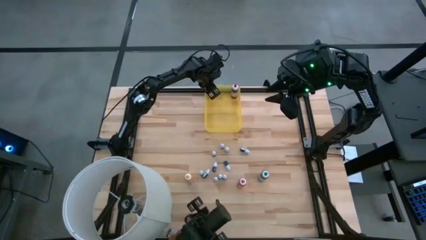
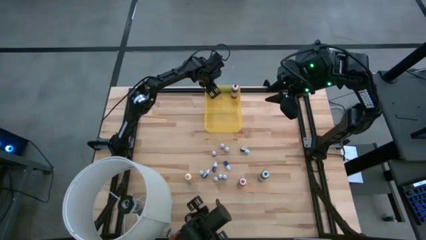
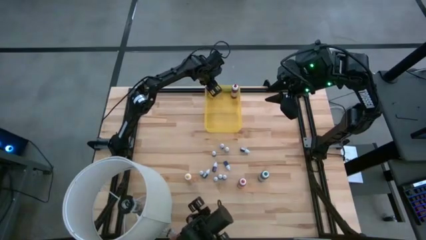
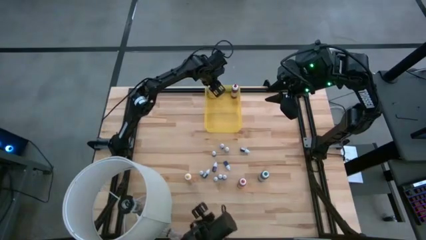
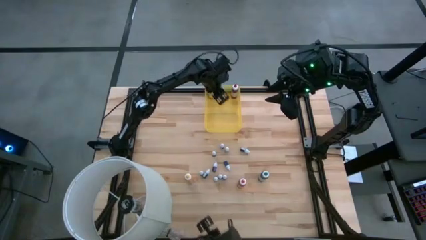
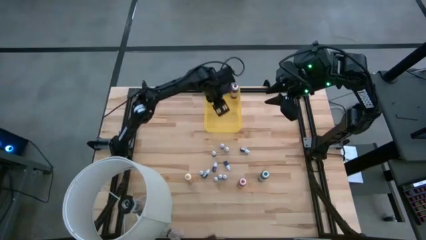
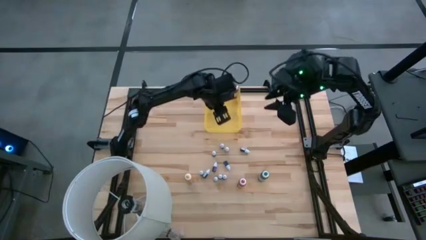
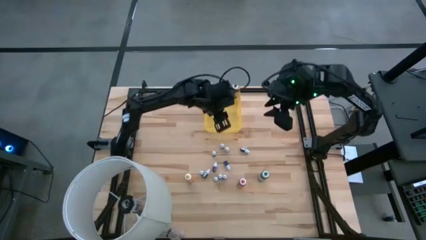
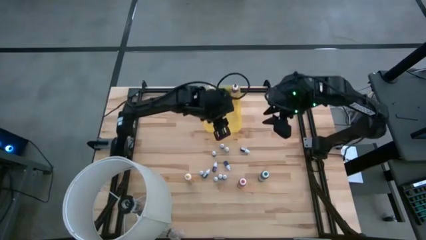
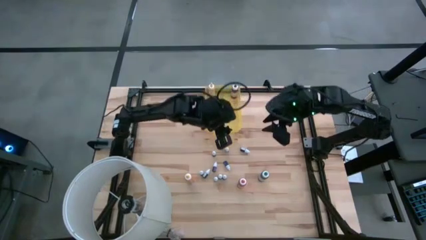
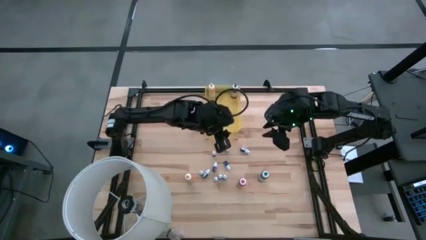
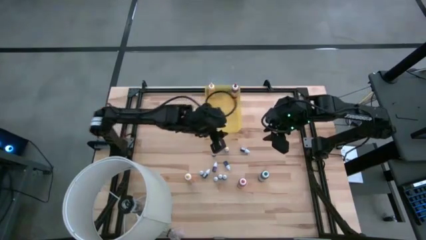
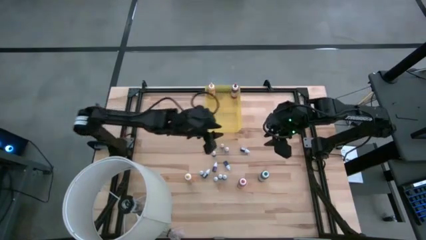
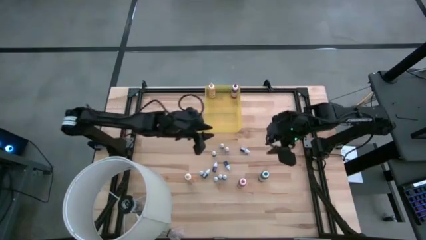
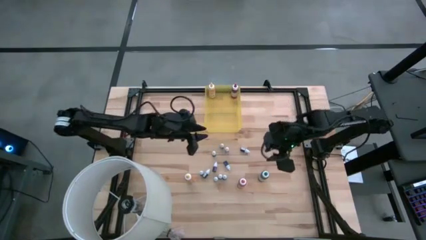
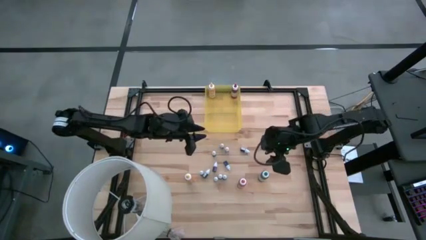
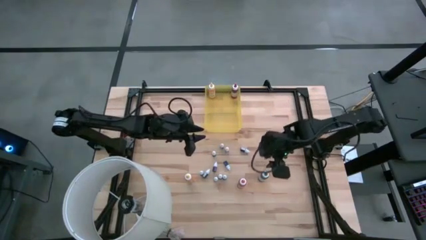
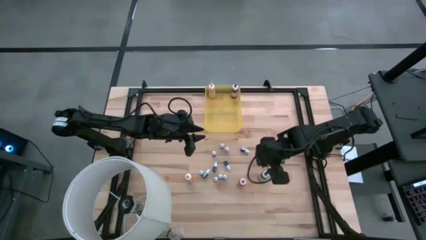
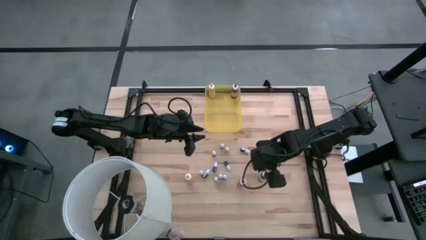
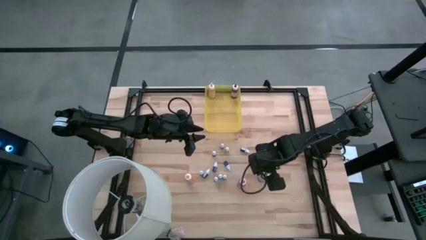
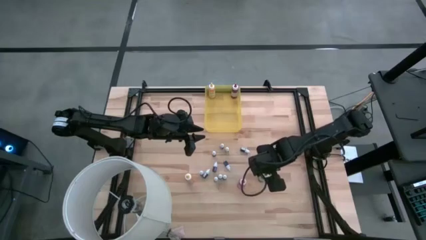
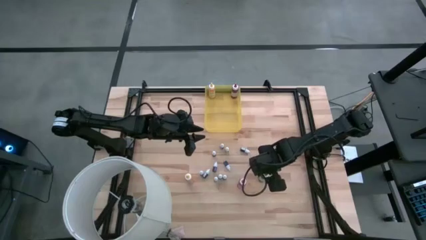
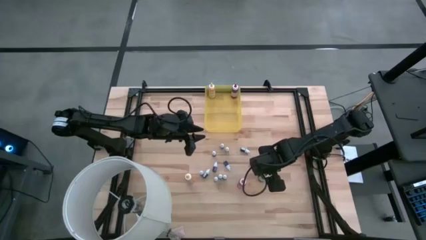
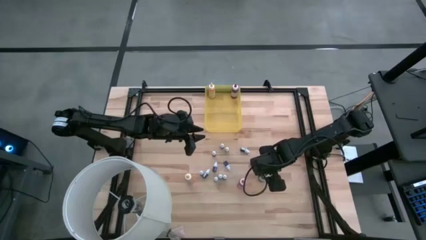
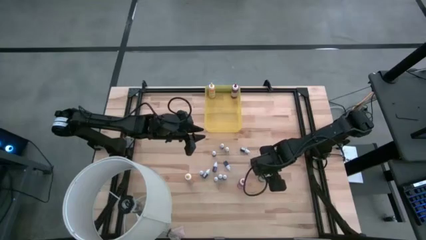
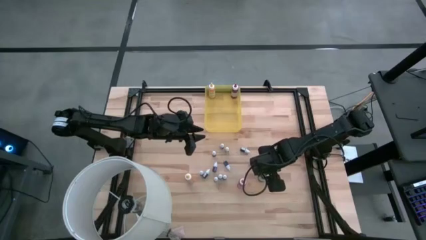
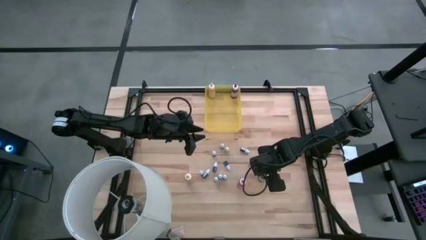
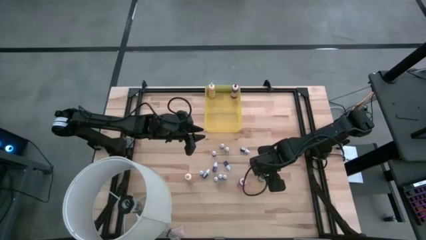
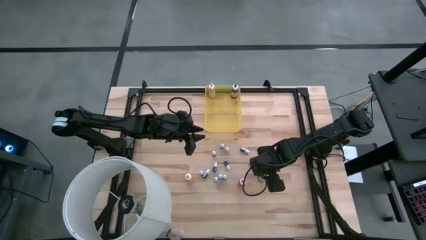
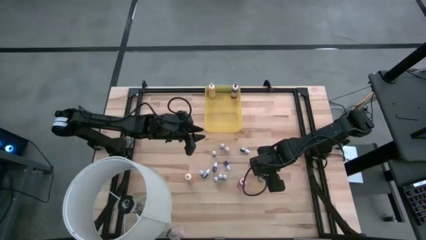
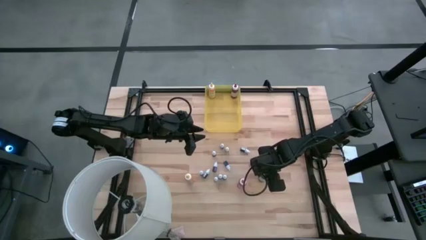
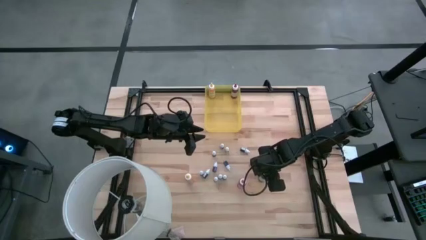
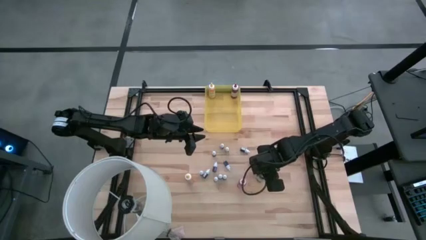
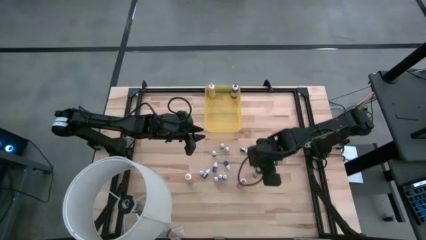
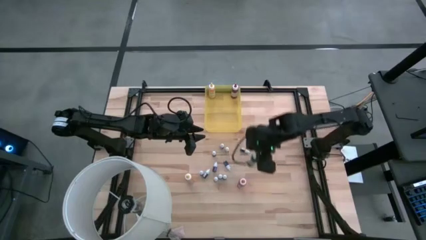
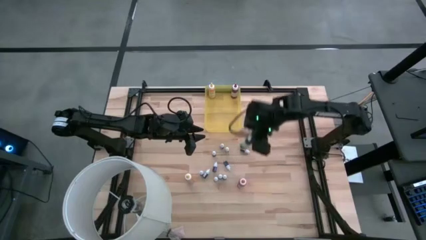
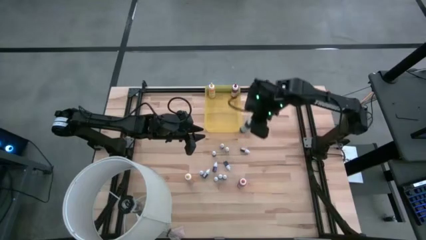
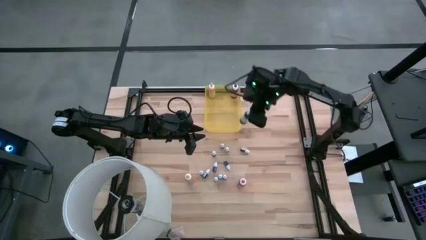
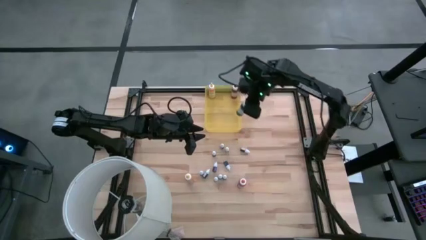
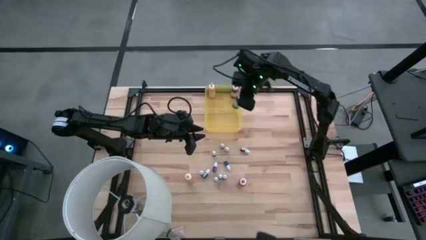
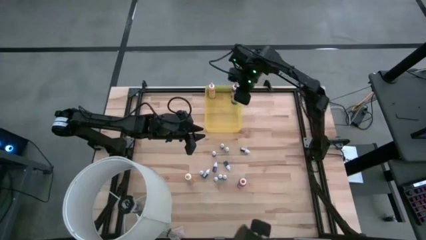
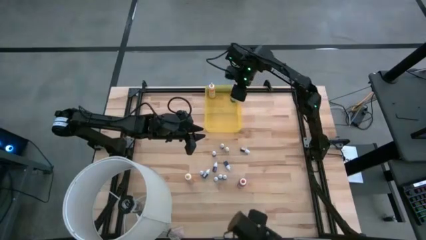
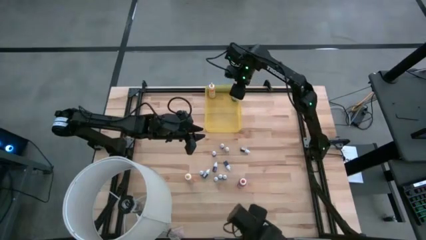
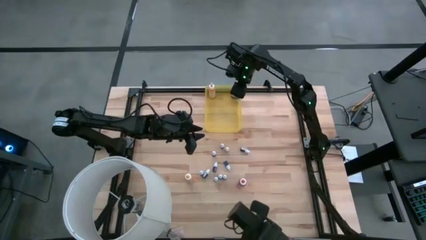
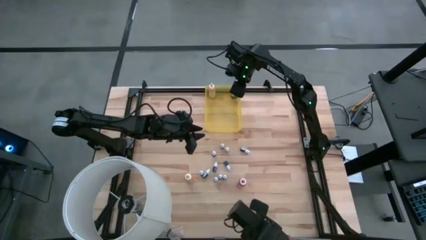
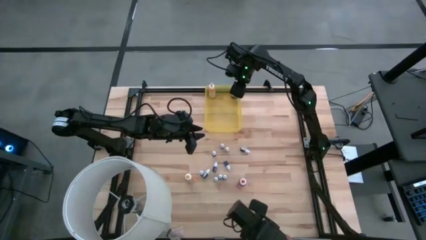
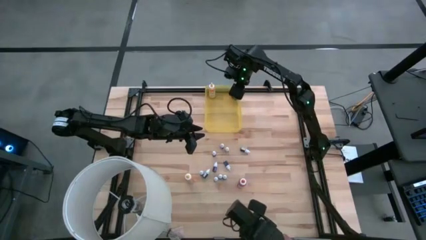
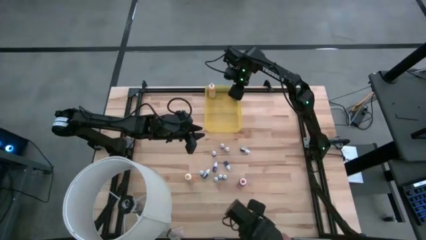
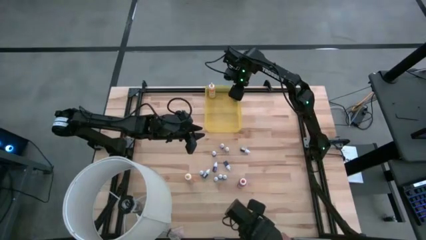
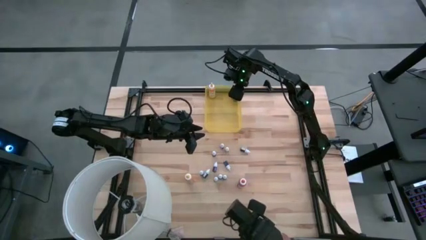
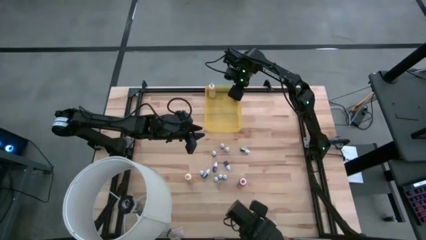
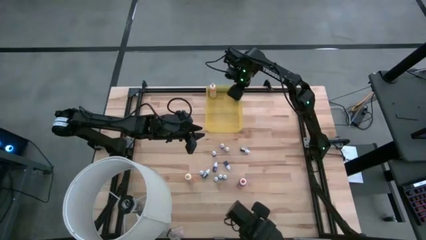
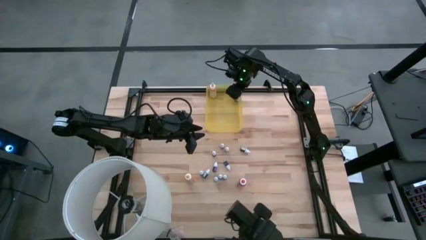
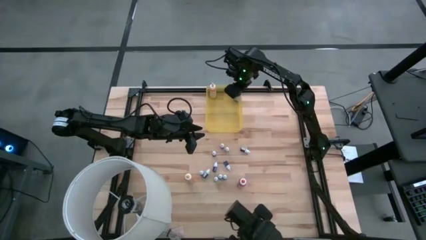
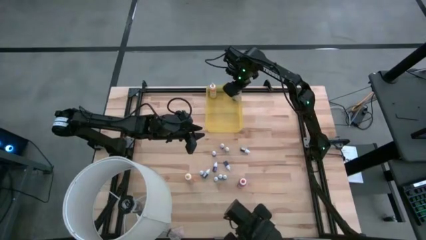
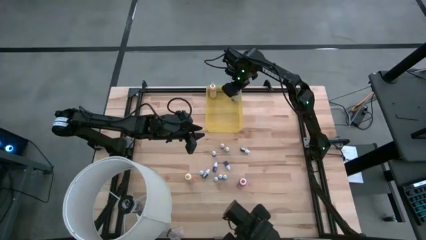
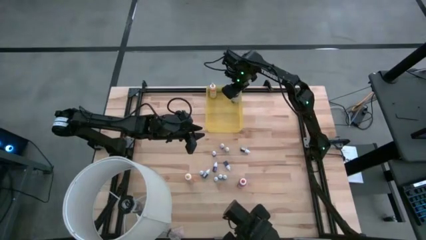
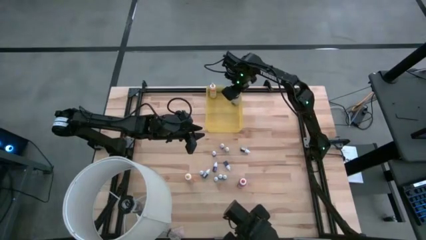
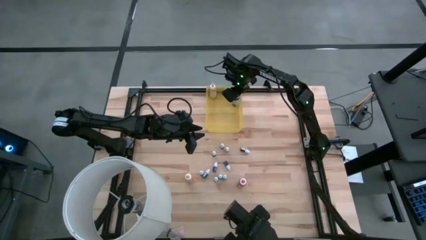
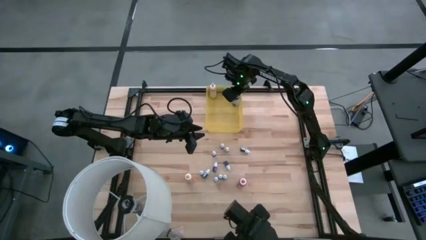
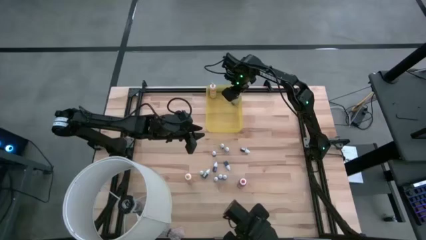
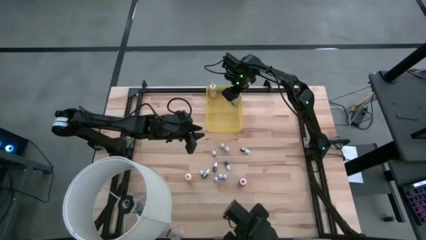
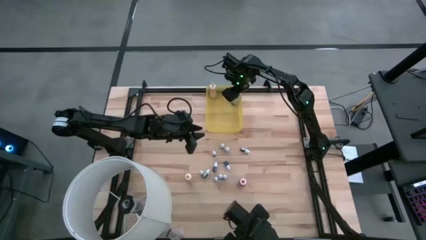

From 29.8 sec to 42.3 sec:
Task: Pick & Place food coloring
Put the large green food coloring bottle into the yellow container
